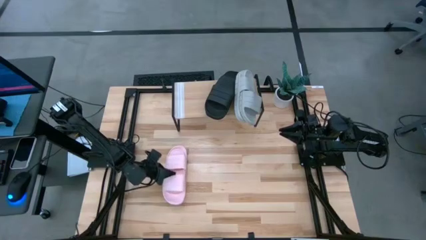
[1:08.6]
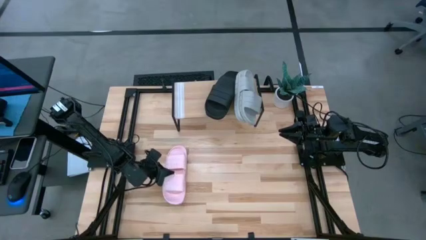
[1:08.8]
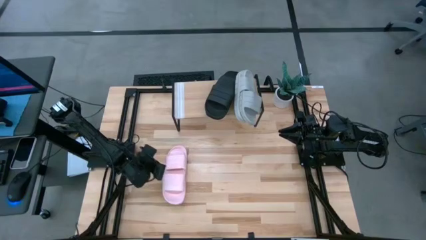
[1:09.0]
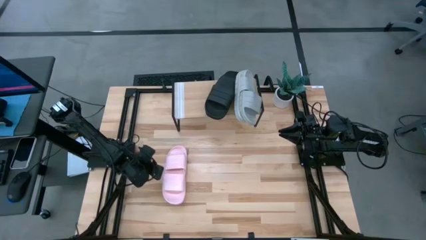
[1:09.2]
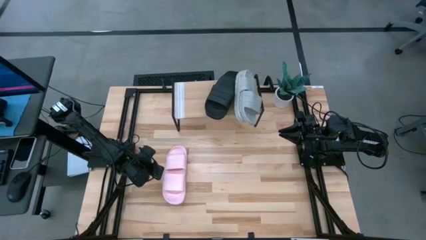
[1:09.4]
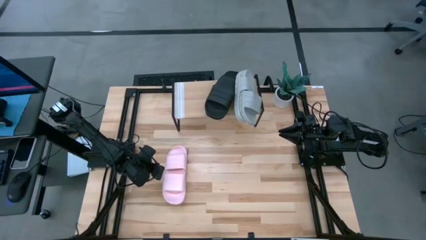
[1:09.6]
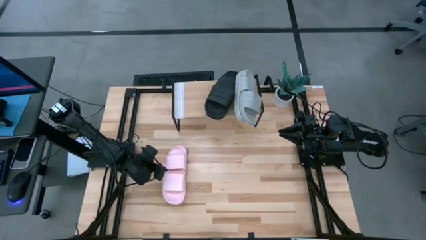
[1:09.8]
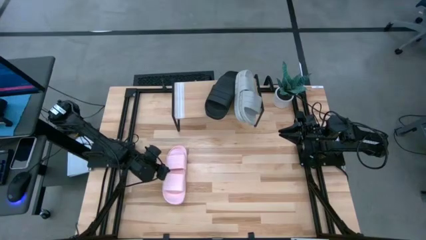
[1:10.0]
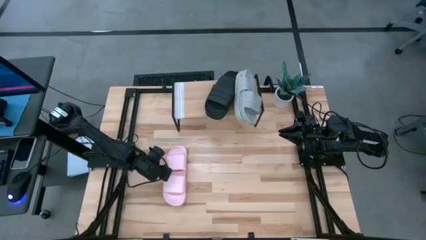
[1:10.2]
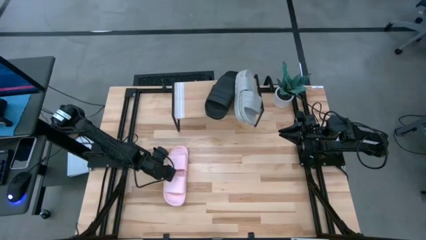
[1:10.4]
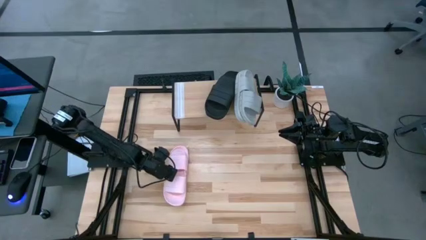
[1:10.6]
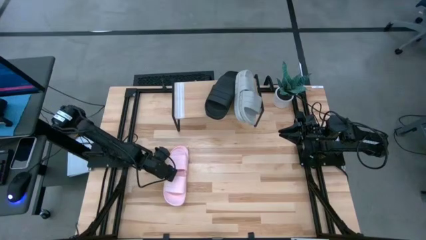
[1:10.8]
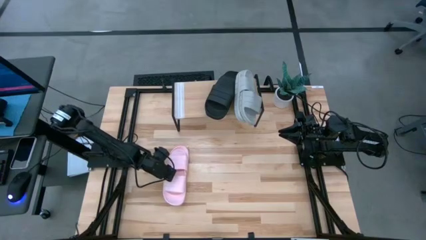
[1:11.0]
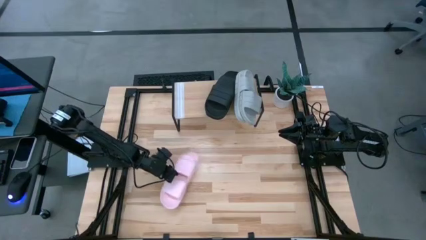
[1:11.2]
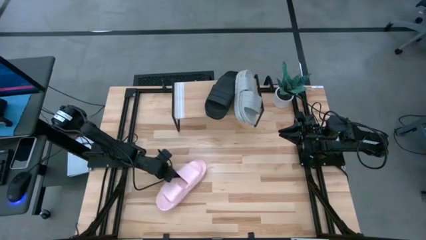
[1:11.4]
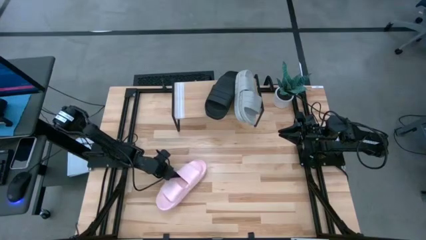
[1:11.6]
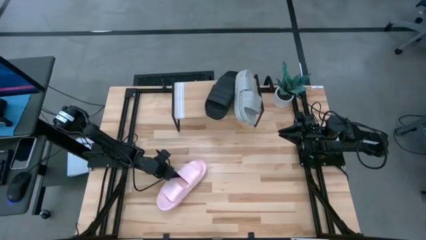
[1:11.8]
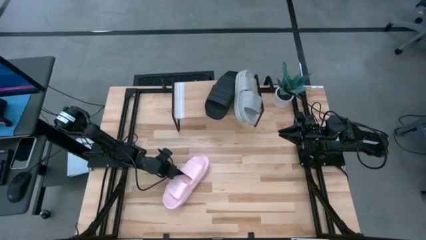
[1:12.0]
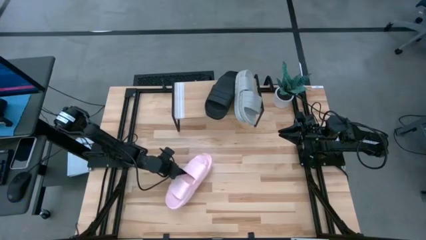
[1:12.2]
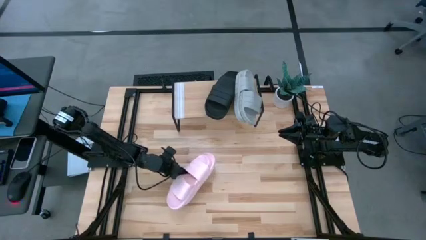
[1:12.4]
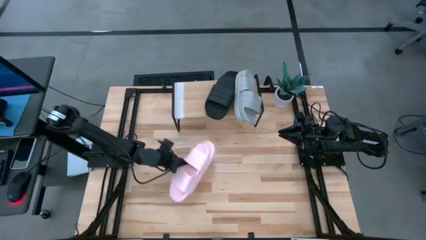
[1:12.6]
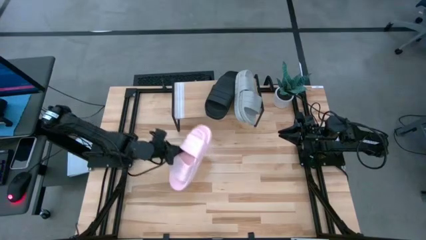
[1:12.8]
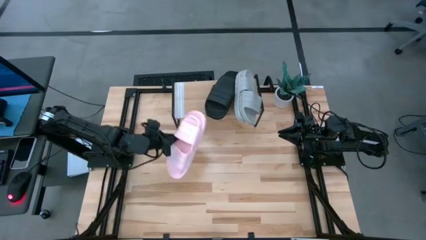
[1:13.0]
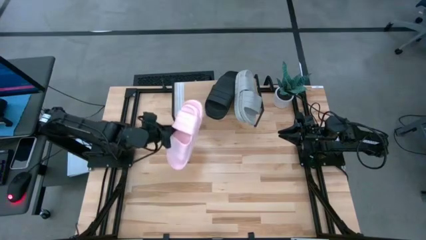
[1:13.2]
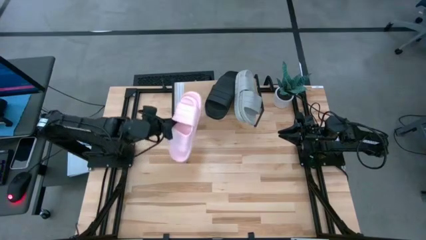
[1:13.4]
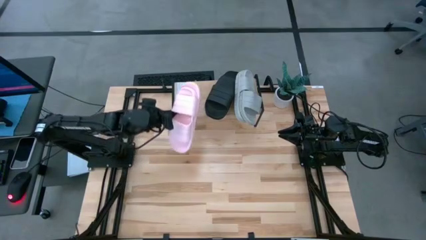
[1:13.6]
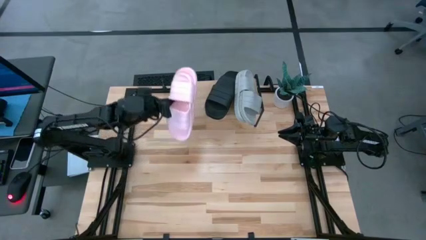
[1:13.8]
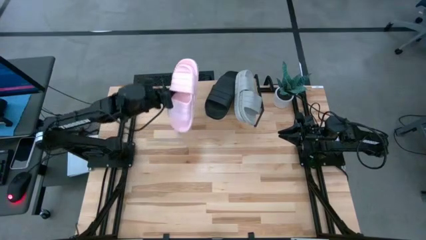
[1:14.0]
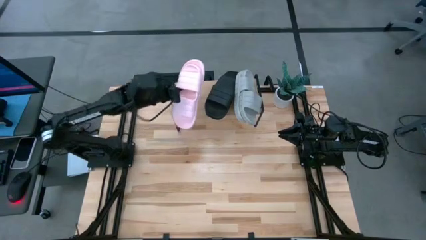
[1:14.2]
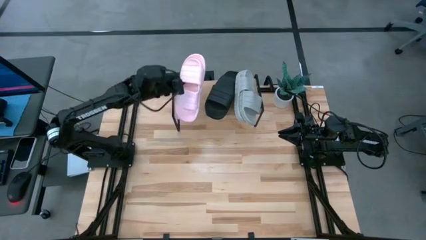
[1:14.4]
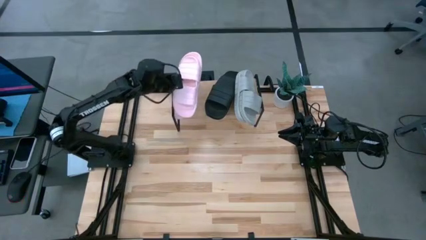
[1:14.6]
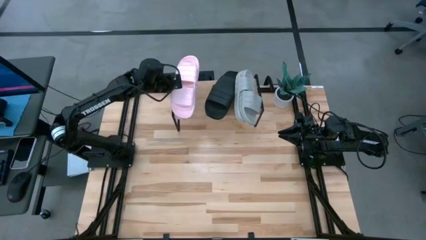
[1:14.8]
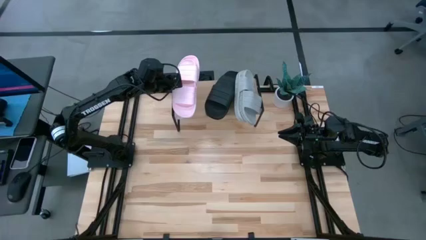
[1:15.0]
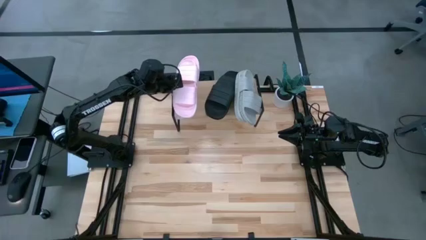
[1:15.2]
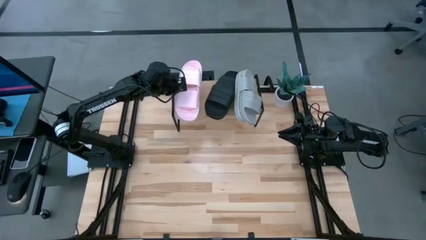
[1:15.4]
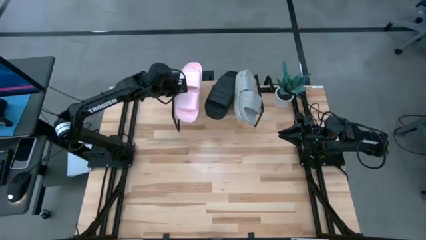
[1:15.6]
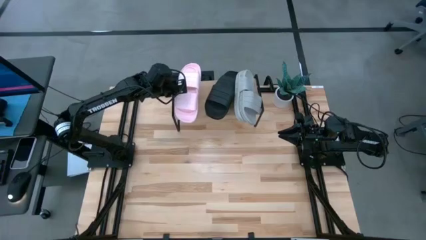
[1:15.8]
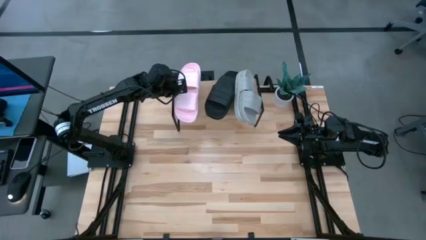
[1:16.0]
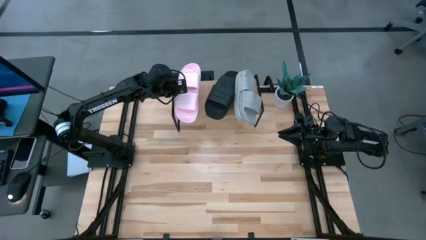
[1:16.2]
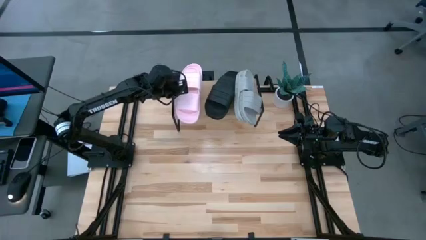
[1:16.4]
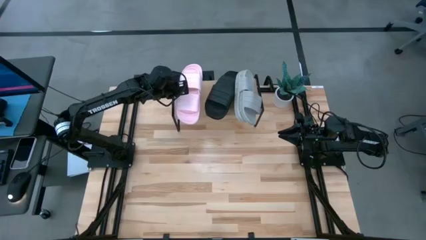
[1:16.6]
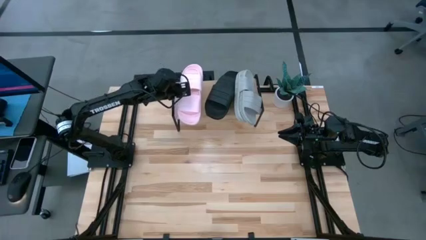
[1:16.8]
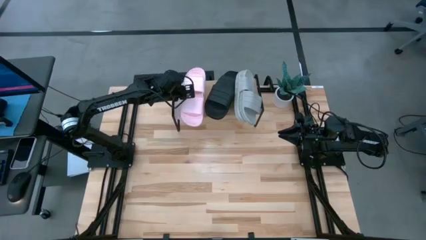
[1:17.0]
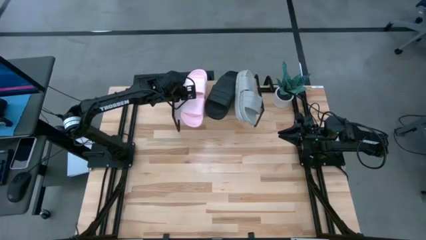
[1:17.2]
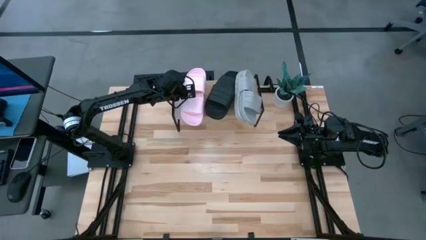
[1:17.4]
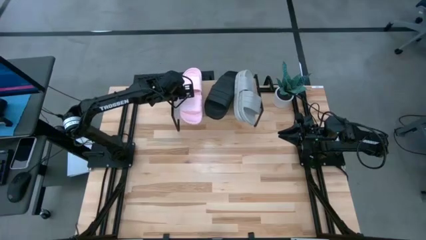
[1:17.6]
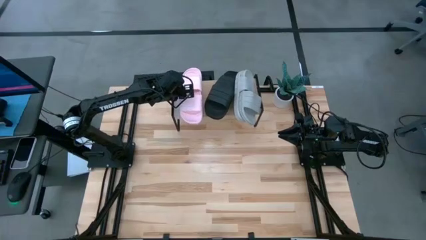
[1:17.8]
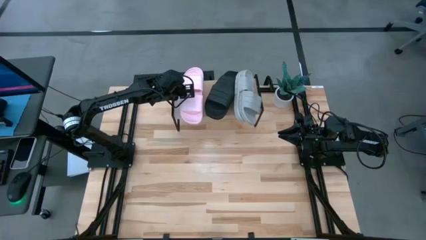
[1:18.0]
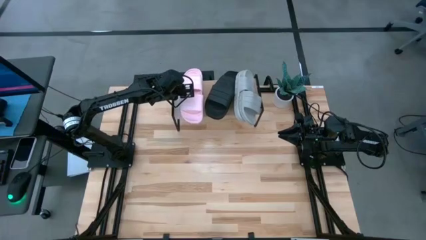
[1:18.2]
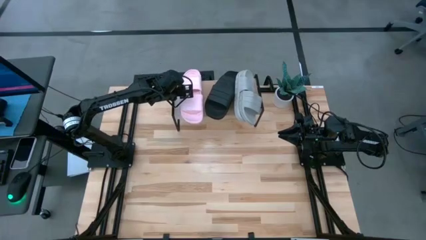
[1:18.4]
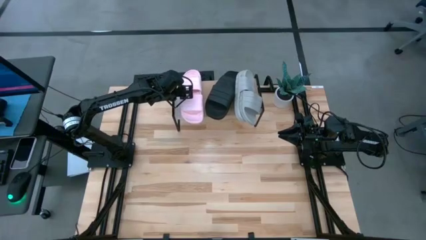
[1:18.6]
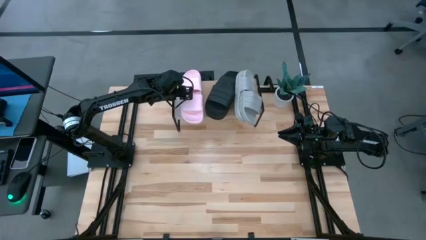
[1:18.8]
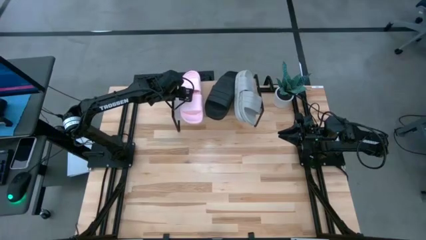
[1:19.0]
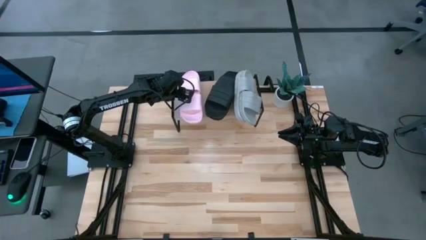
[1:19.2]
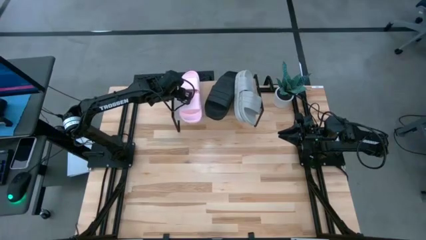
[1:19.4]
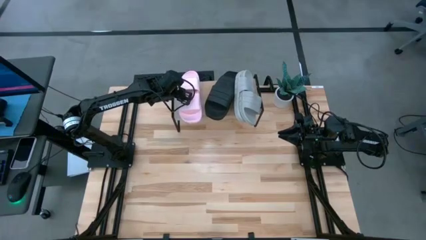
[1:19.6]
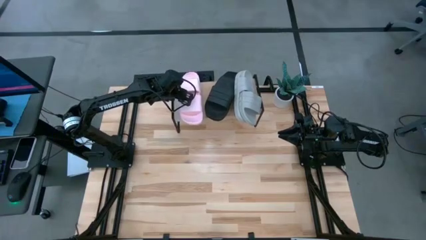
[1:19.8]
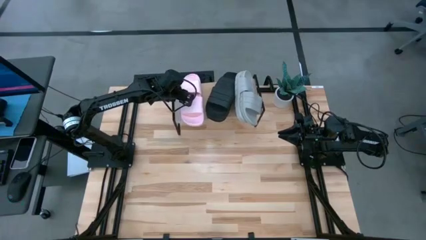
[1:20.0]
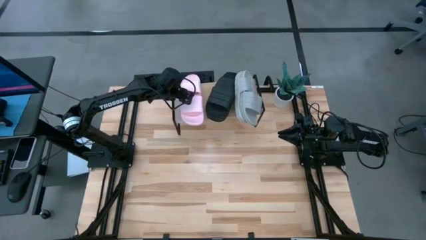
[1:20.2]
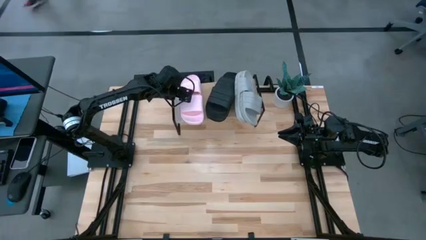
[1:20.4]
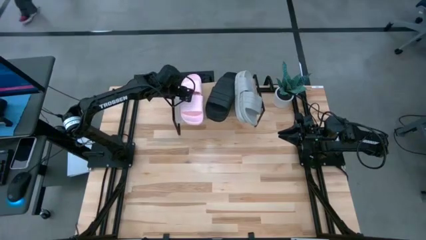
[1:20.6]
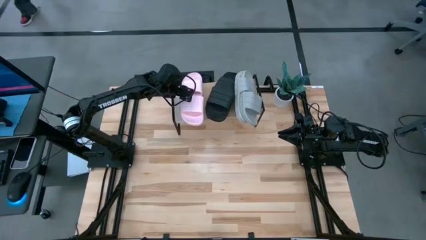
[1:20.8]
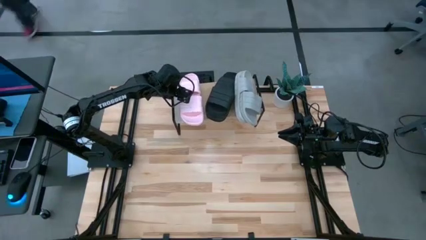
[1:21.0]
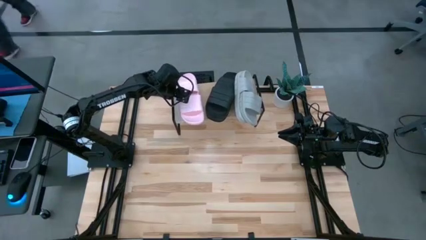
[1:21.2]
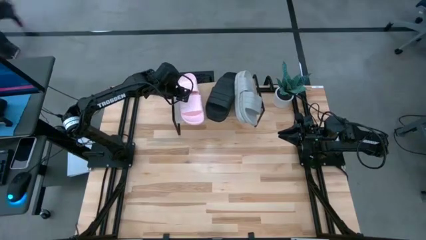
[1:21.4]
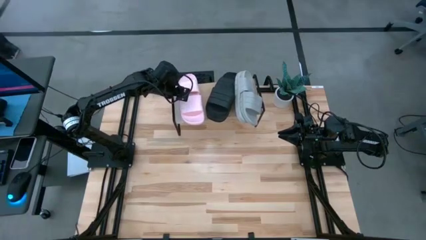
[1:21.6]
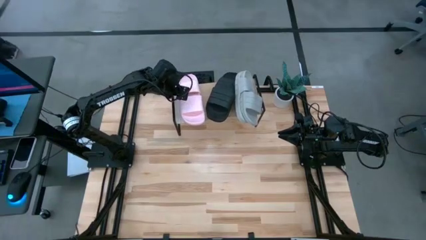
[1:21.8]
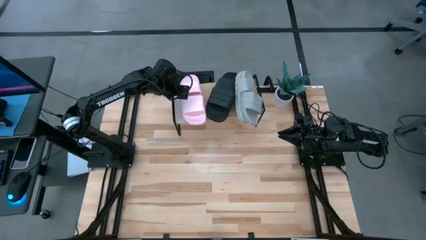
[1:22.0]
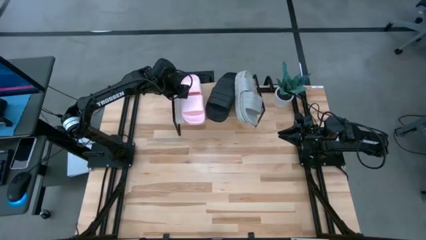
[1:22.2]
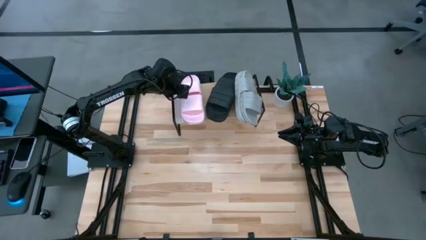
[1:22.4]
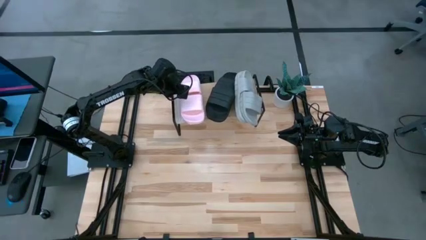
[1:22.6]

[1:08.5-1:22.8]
Task: Pick and place slides into the shelf
Put the pink pair of slides on the shelf
